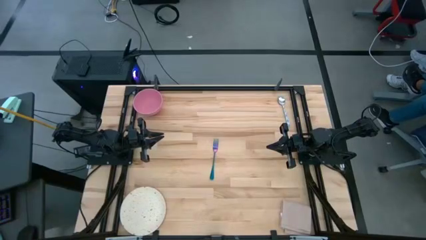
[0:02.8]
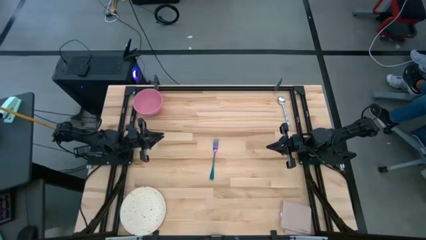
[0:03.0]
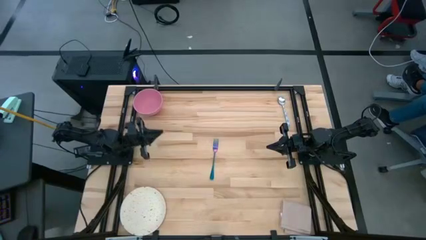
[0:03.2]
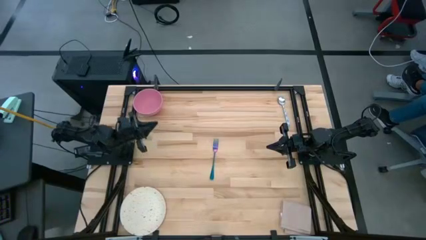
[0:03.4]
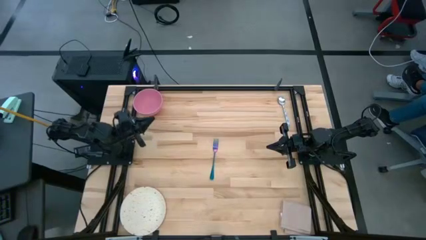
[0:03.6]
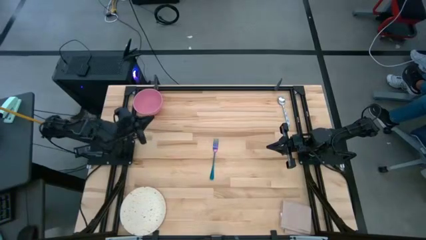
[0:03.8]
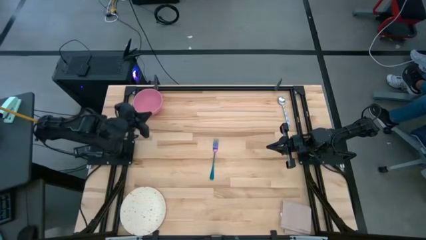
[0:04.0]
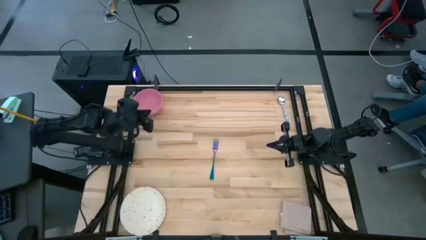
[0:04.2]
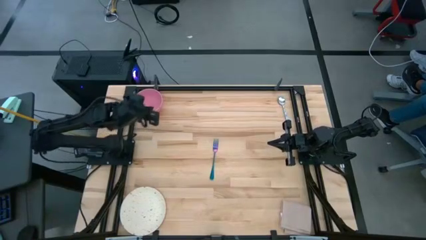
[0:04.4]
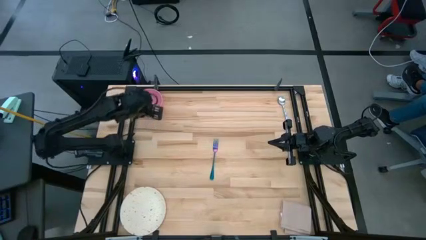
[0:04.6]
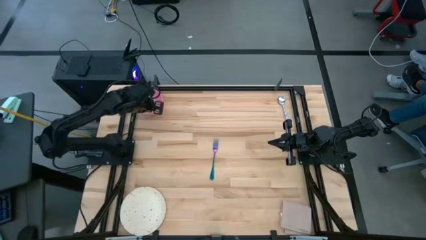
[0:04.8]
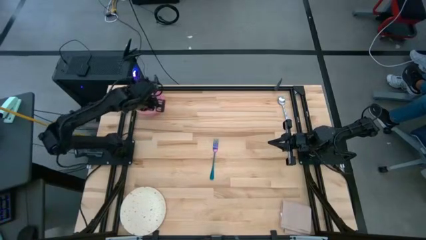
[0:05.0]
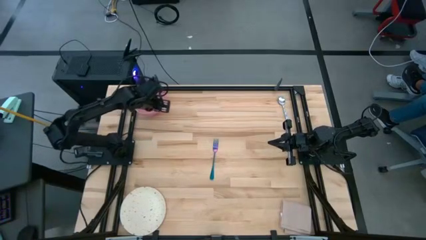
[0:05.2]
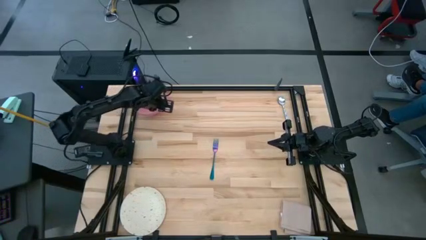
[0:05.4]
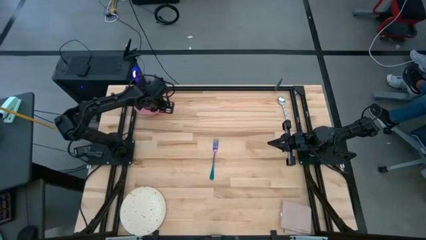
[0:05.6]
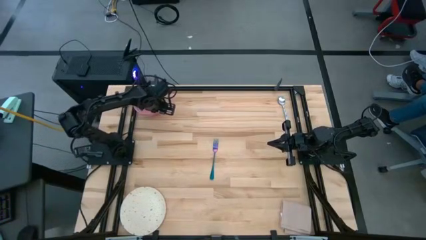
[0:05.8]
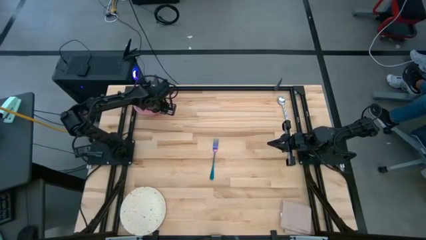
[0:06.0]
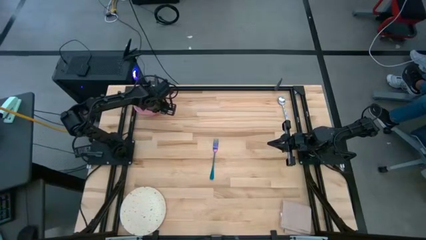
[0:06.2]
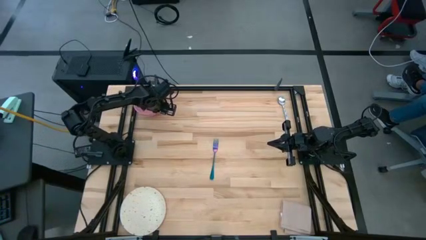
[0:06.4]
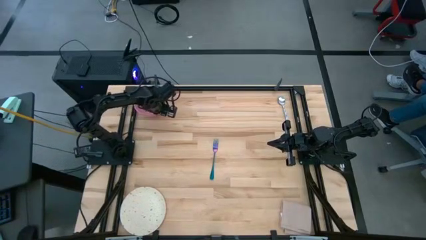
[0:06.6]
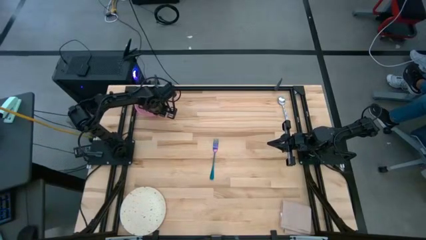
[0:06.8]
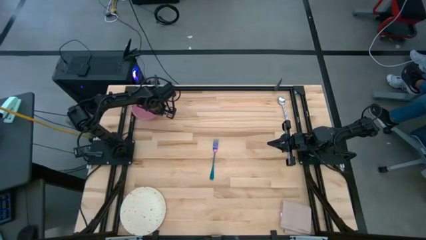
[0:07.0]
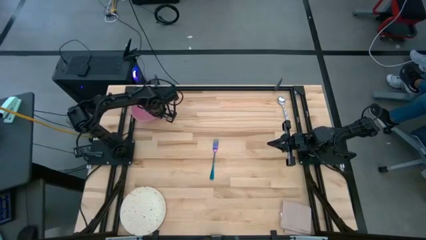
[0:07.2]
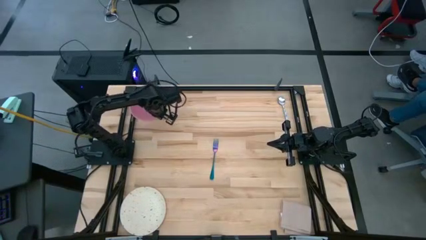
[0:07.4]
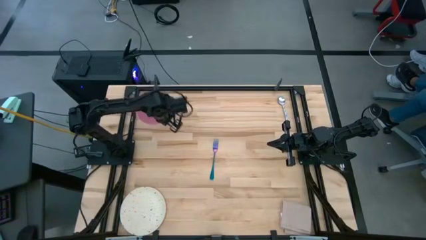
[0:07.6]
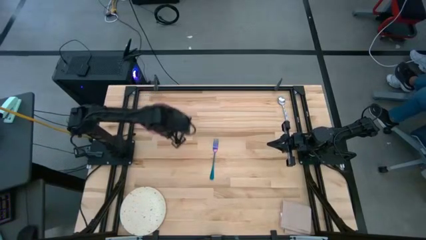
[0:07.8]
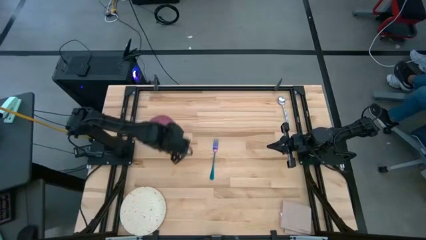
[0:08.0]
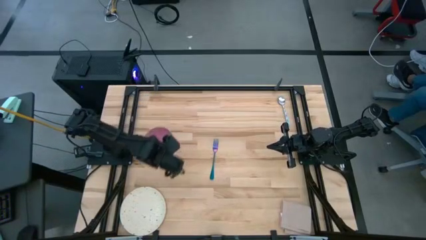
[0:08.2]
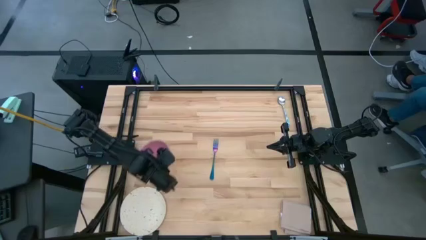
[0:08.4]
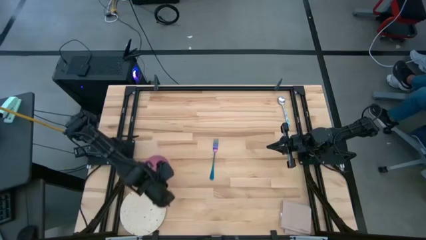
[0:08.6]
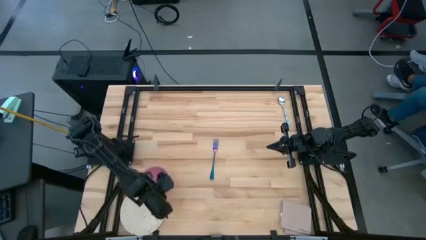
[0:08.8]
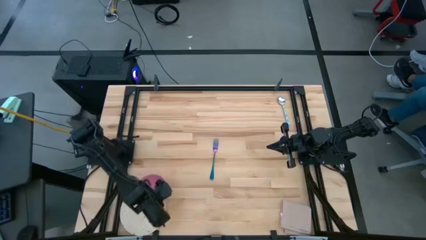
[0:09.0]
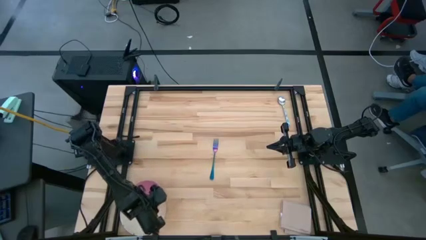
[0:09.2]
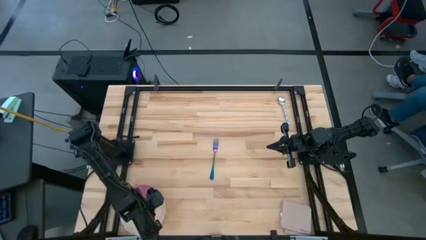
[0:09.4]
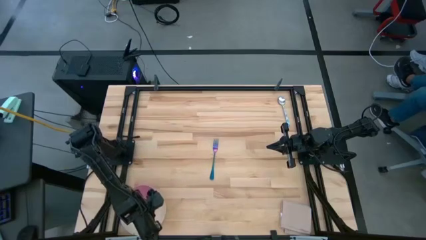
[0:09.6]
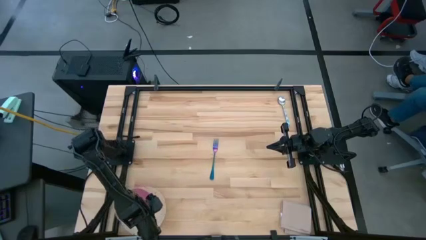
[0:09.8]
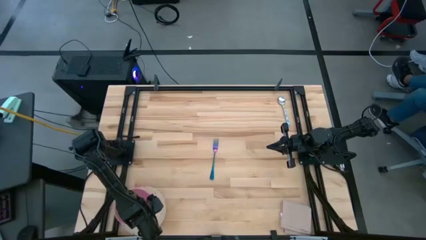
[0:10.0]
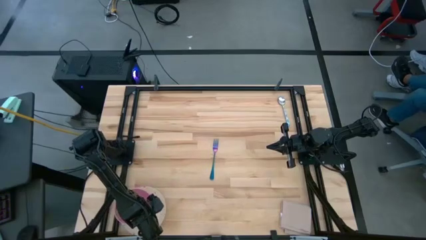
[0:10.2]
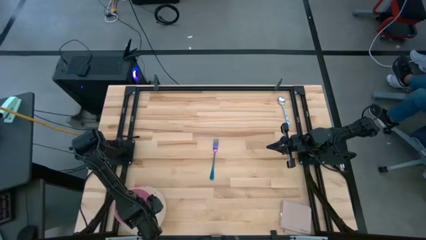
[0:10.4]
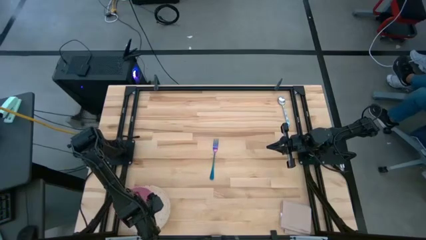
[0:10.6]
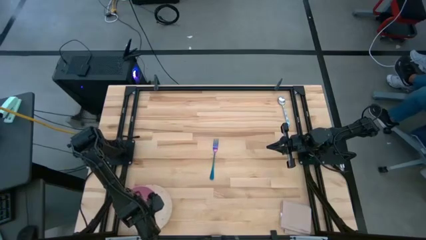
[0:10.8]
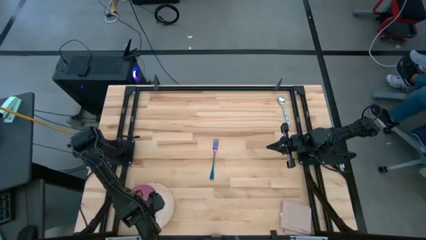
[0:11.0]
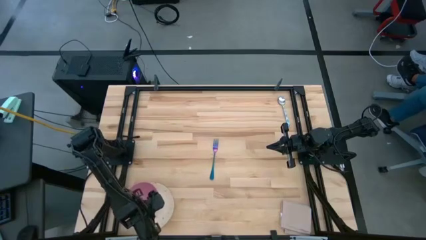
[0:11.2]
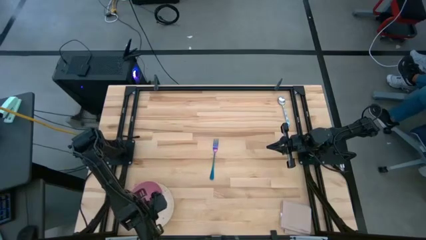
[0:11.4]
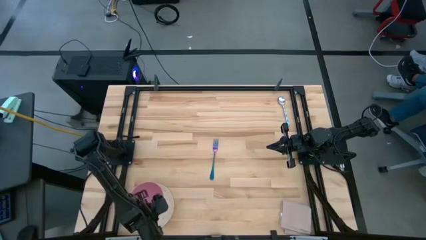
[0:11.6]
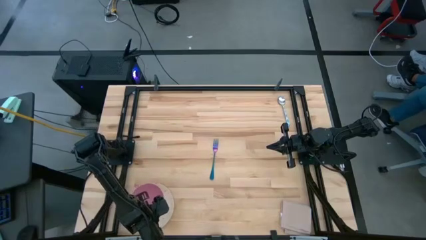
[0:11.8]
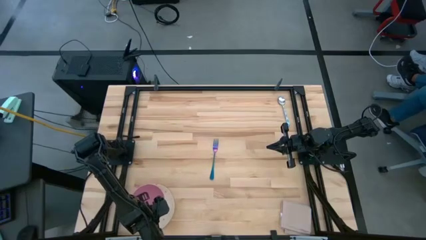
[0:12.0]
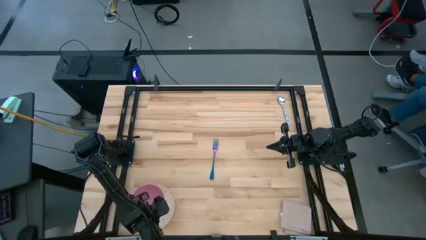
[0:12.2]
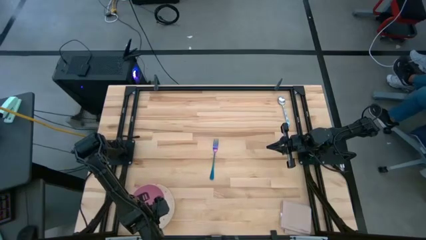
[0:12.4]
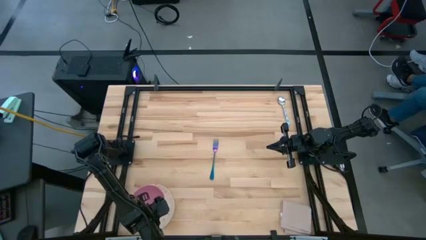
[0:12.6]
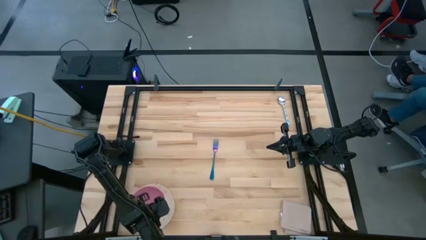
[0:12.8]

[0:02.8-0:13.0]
Task: Set table place
Put the pink bowl into the white pattern plate

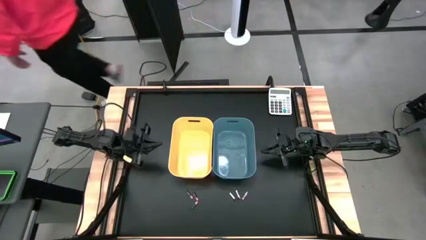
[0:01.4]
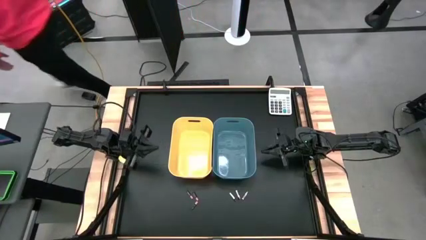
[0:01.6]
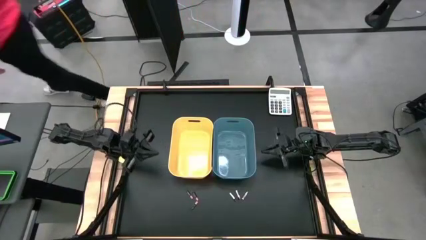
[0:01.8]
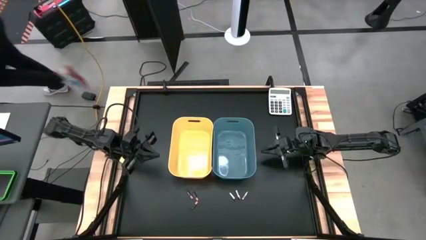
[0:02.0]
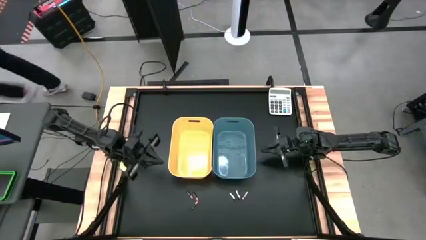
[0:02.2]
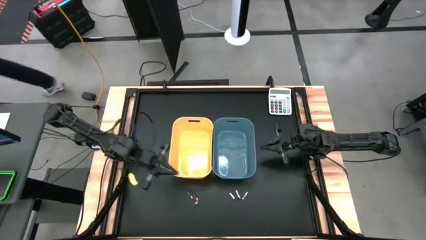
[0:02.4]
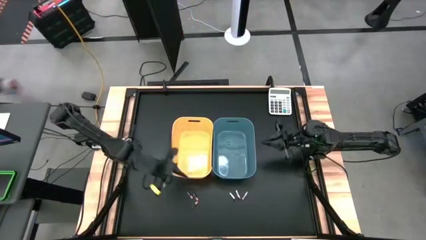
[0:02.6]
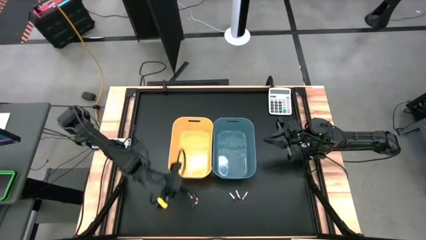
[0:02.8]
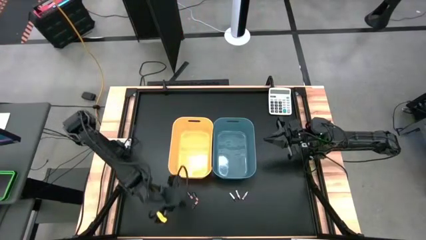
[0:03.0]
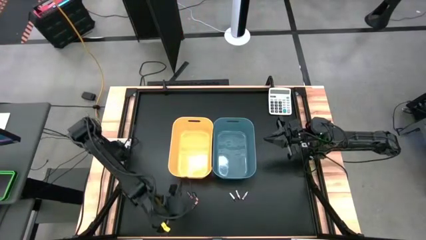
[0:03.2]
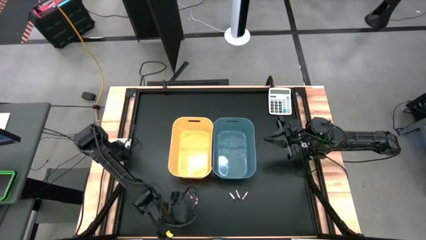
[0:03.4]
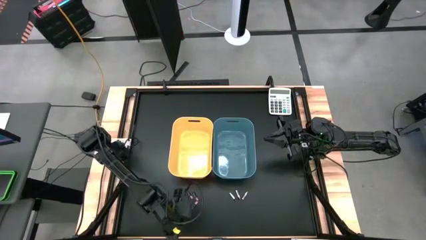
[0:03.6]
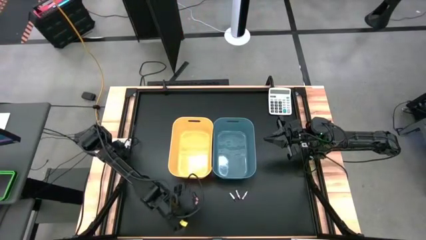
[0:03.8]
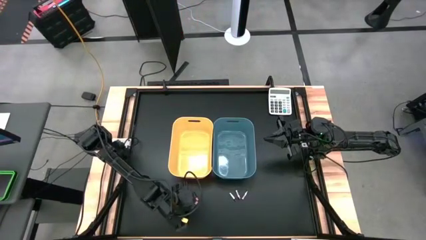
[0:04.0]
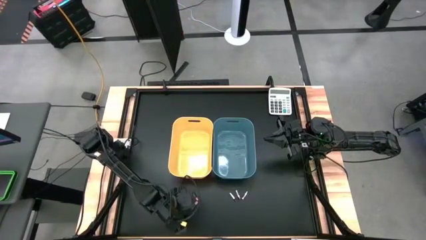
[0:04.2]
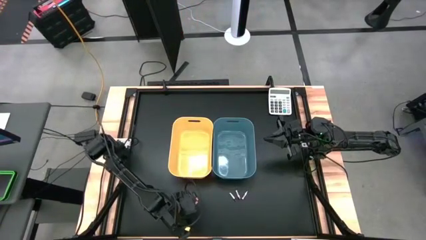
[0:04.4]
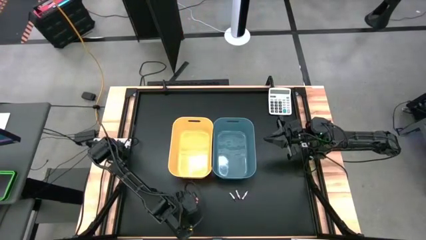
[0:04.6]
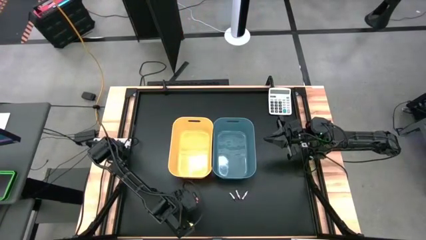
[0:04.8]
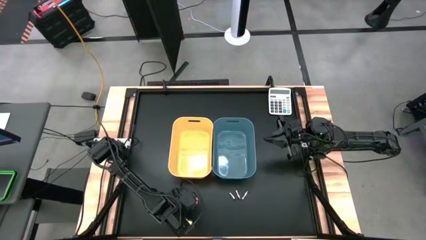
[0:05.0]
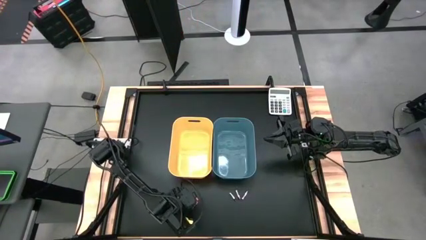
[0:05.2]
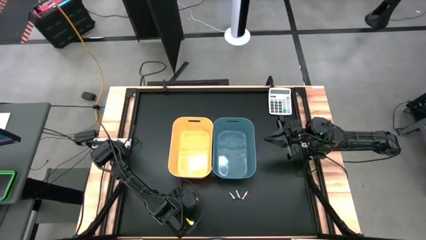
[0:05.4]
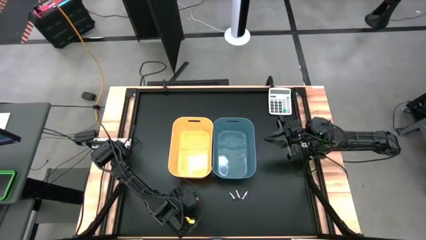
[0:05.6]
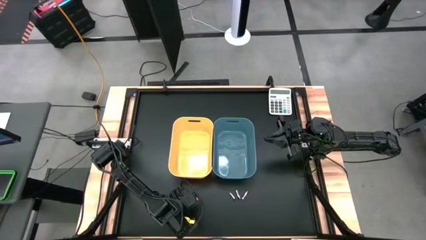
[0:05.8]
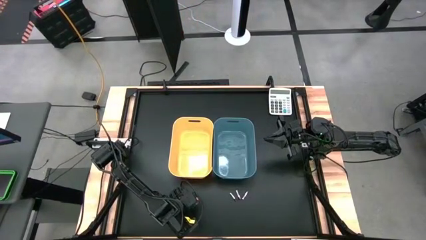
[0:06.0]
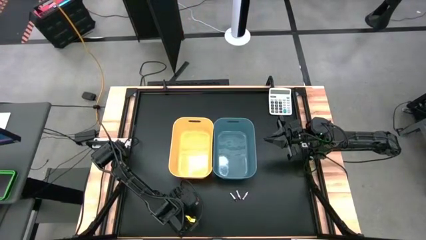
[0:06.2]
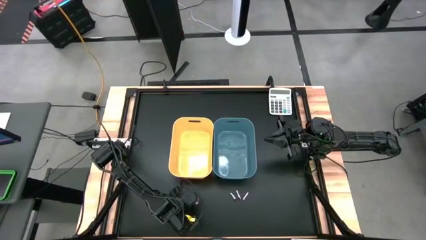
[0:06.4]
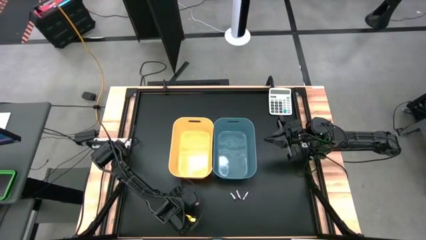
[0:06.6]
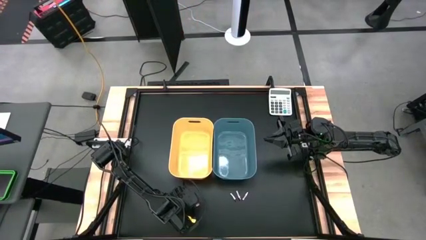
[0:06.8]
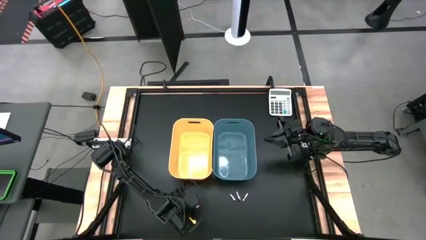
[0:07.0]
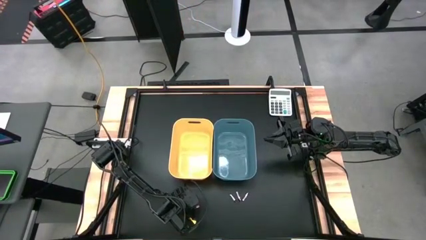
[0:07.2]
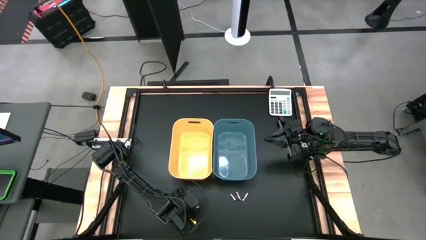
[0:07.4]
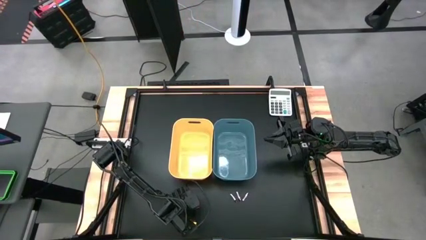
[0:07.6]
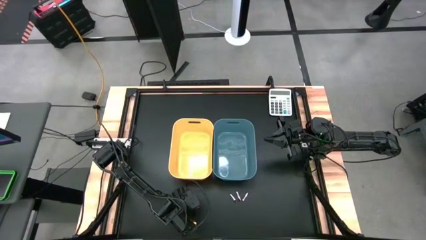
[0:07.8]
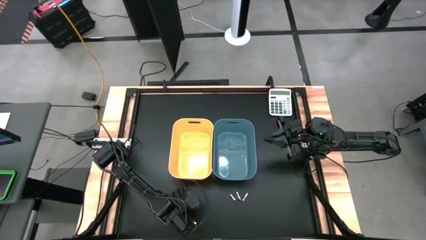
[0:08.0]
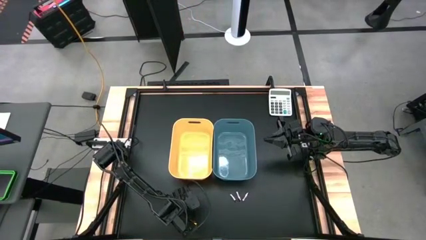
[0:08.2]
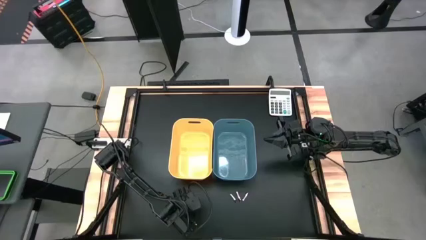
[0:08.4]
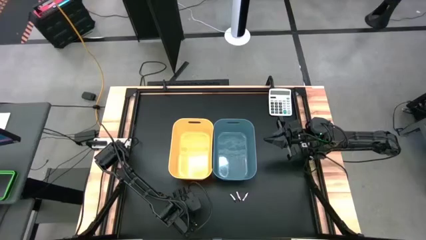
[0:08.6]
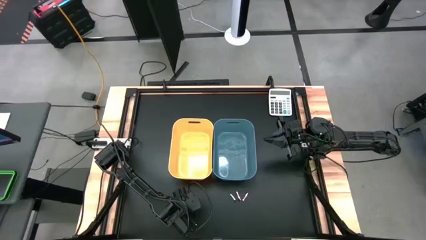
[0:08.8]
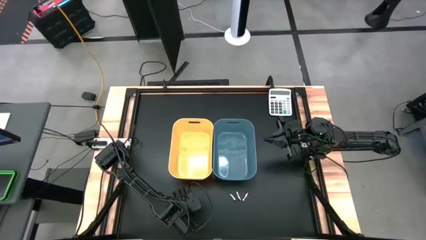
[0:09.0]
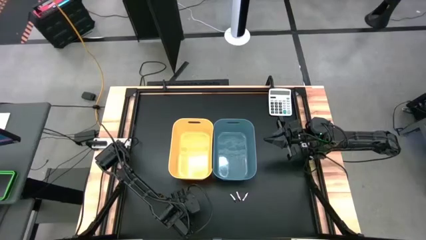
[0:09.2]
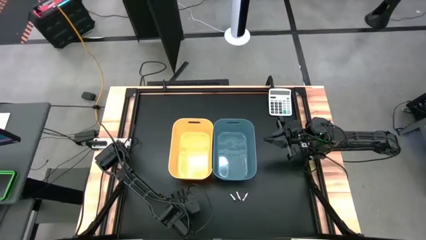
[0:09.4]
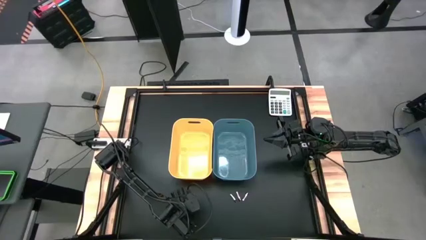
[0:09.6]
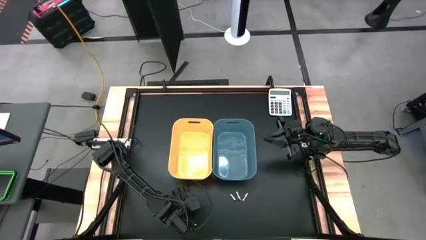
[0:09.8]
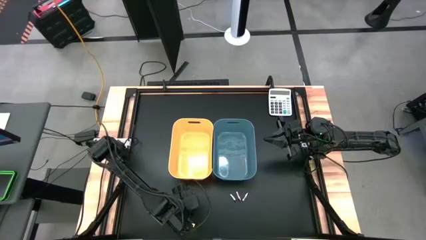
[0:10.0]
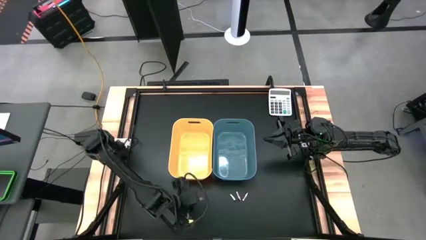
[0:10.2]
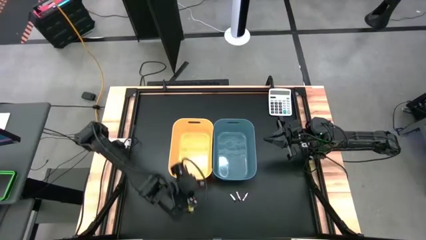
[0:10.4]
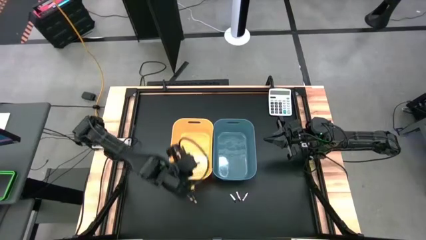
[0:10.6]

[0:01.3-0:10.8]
Task: Sort batteries
Put the bottom right black battery into the yellow bin
